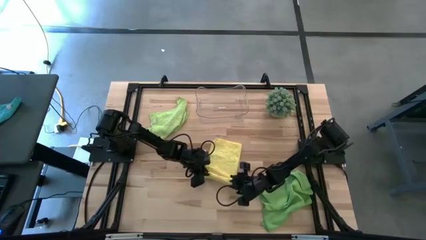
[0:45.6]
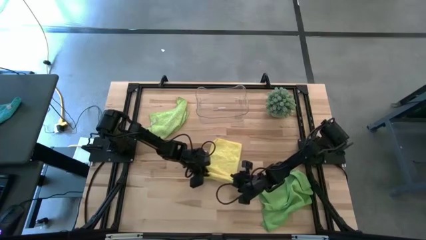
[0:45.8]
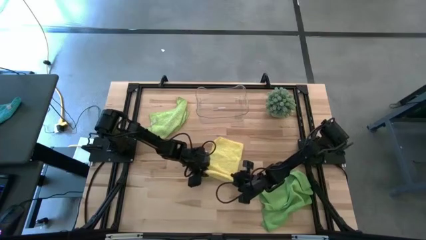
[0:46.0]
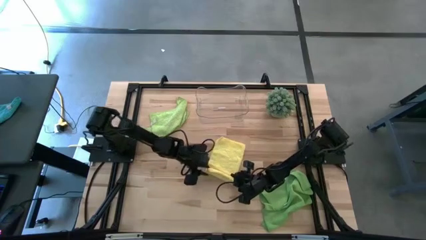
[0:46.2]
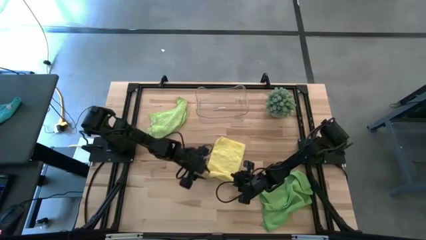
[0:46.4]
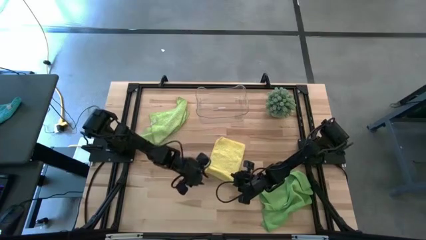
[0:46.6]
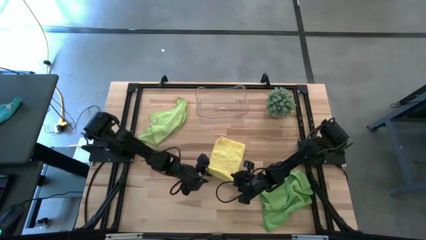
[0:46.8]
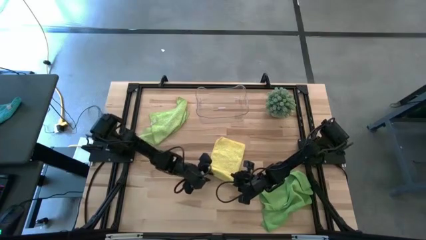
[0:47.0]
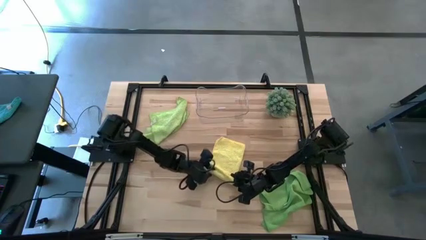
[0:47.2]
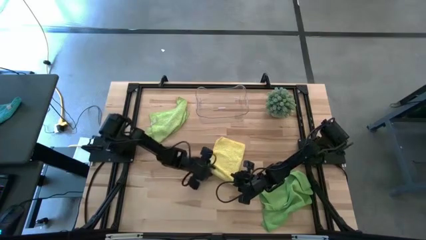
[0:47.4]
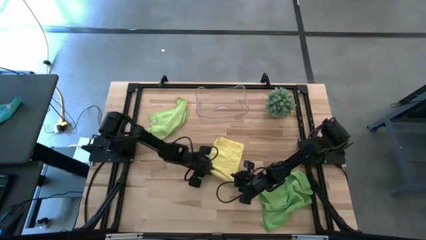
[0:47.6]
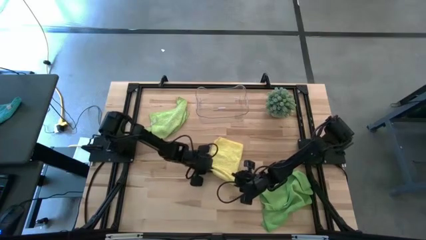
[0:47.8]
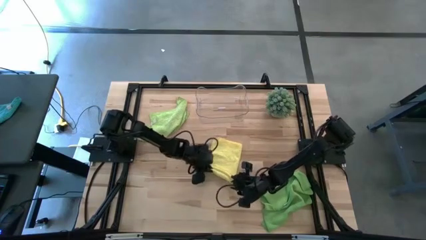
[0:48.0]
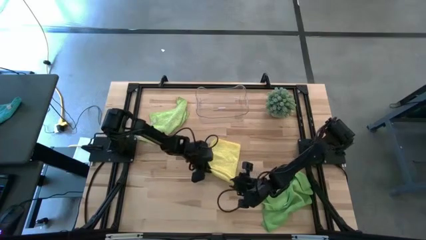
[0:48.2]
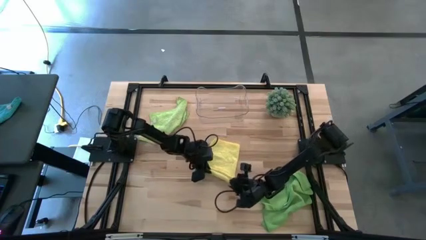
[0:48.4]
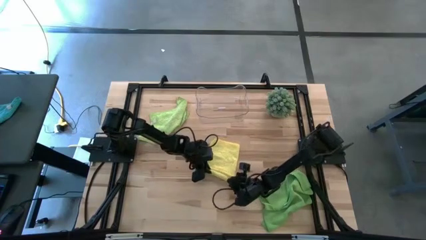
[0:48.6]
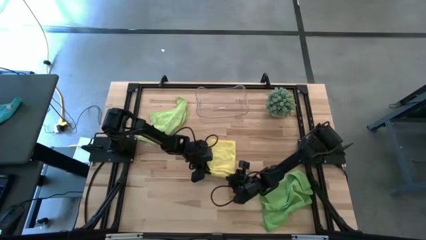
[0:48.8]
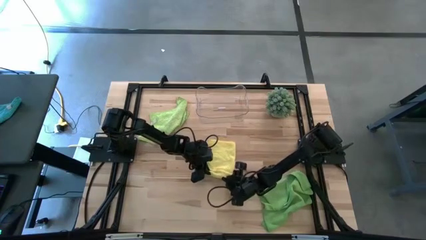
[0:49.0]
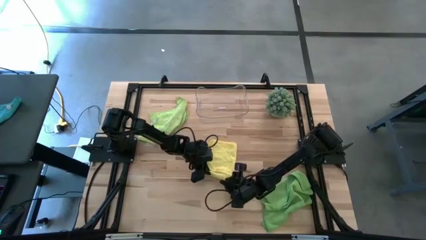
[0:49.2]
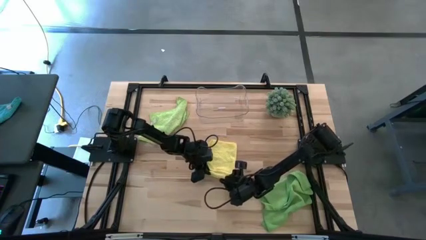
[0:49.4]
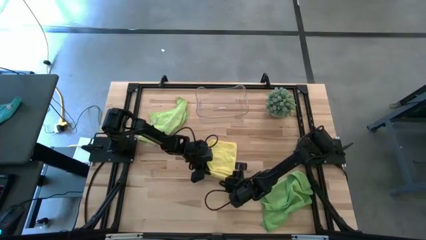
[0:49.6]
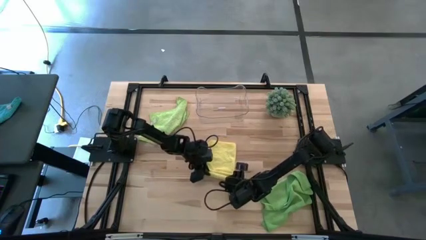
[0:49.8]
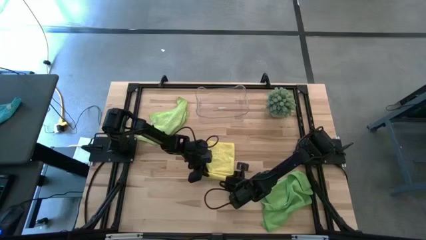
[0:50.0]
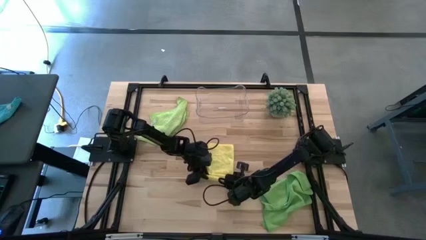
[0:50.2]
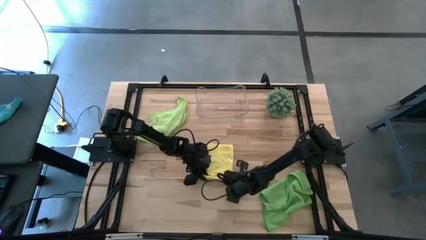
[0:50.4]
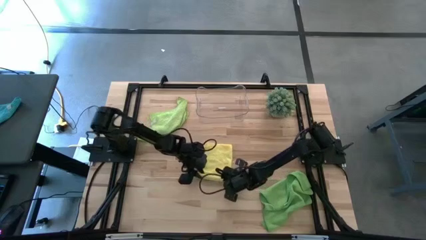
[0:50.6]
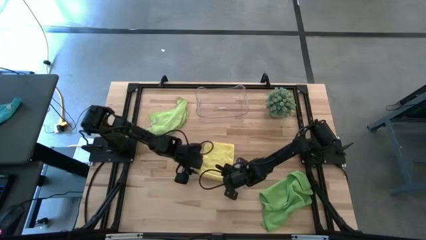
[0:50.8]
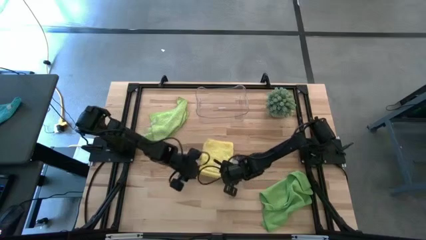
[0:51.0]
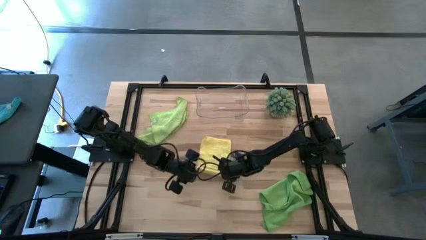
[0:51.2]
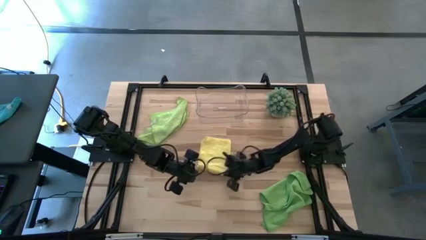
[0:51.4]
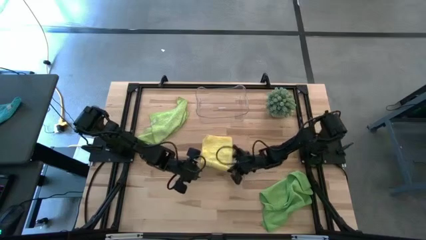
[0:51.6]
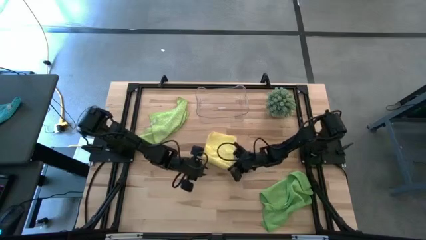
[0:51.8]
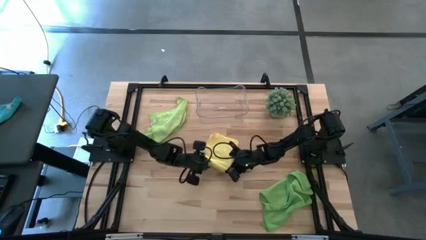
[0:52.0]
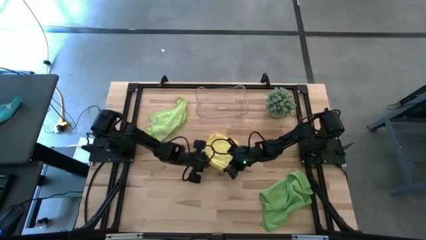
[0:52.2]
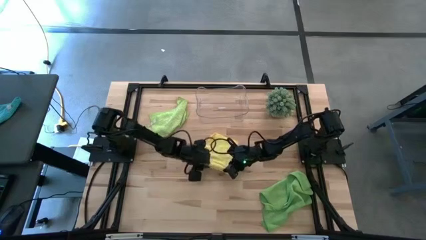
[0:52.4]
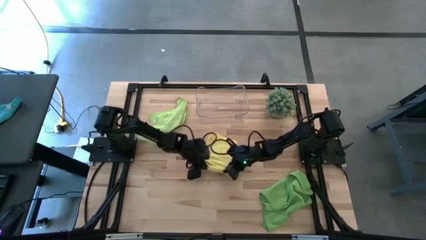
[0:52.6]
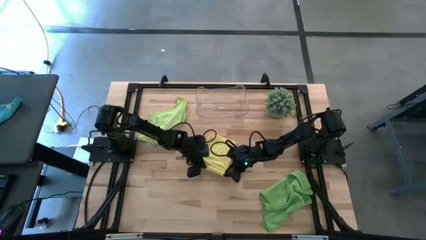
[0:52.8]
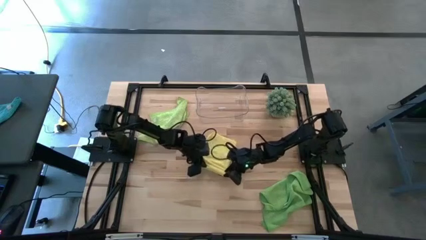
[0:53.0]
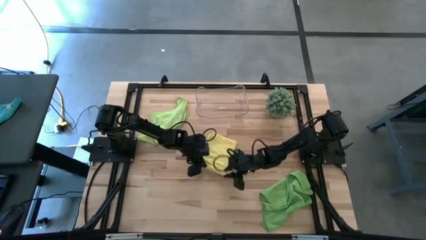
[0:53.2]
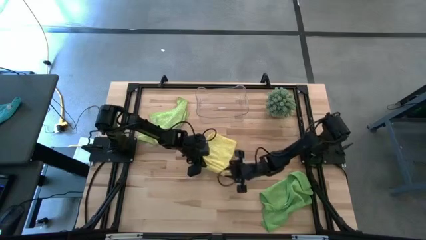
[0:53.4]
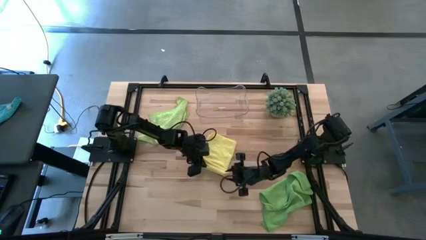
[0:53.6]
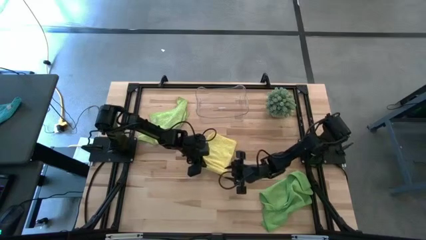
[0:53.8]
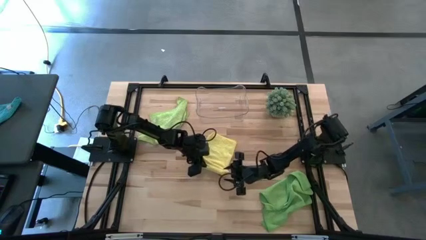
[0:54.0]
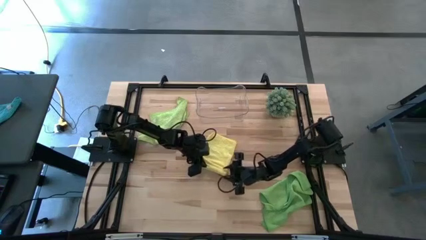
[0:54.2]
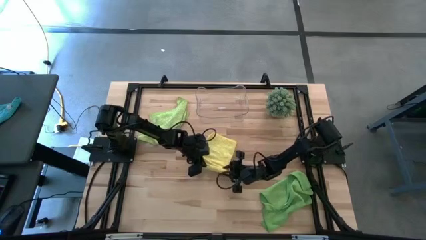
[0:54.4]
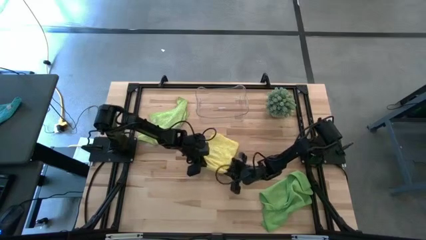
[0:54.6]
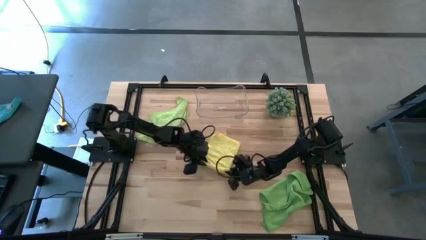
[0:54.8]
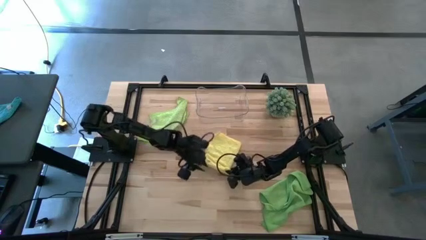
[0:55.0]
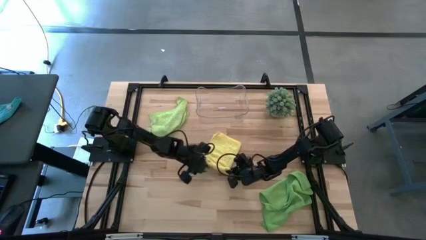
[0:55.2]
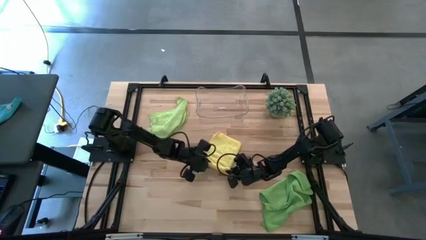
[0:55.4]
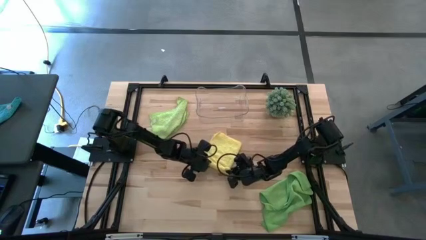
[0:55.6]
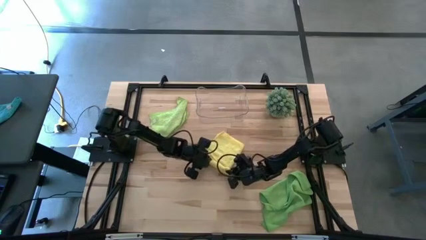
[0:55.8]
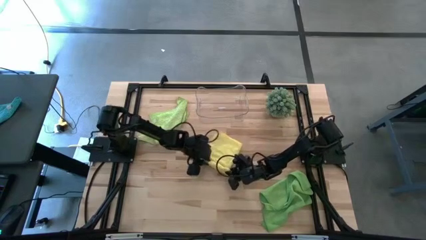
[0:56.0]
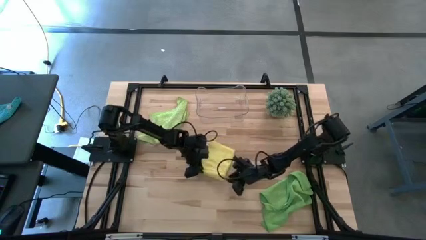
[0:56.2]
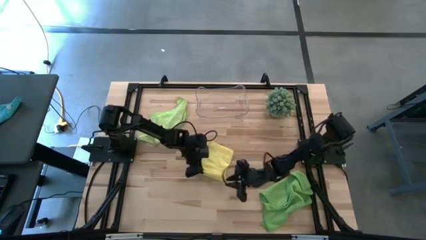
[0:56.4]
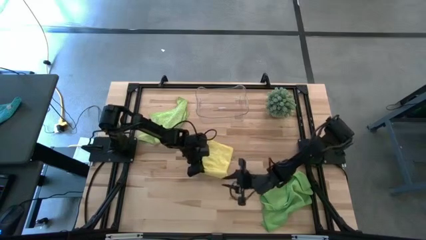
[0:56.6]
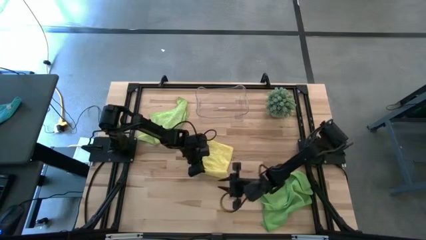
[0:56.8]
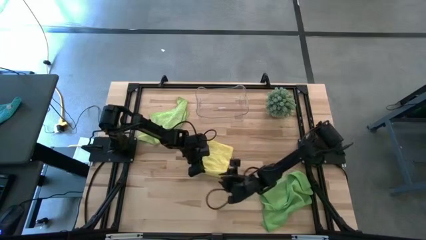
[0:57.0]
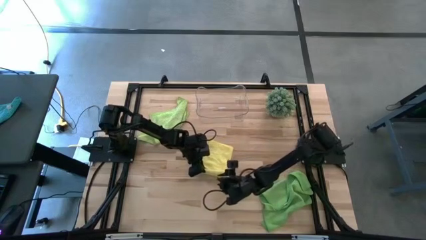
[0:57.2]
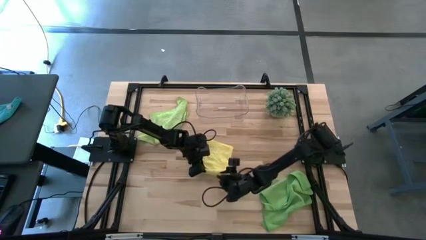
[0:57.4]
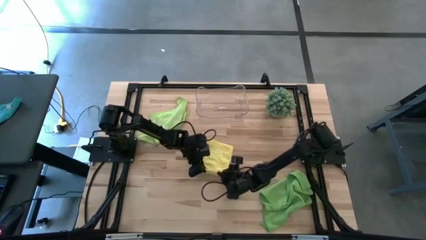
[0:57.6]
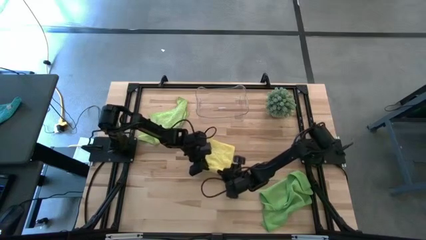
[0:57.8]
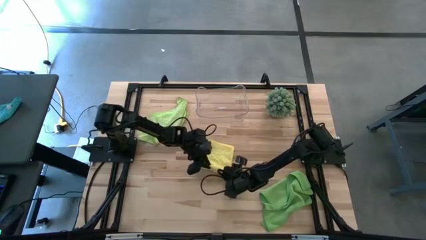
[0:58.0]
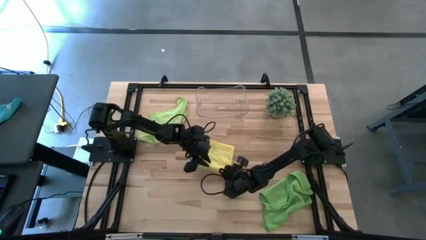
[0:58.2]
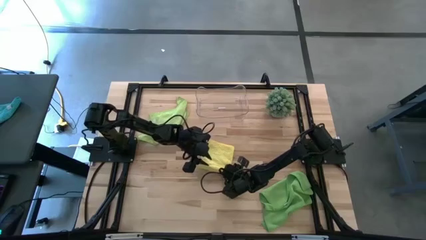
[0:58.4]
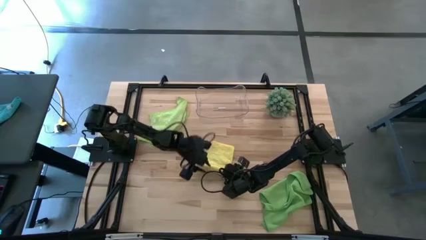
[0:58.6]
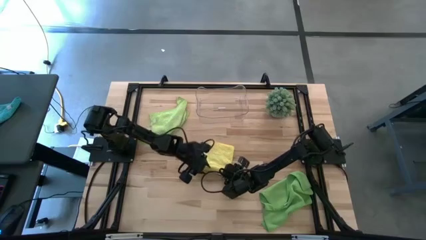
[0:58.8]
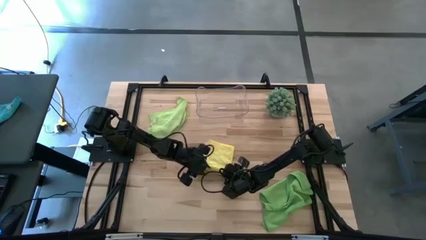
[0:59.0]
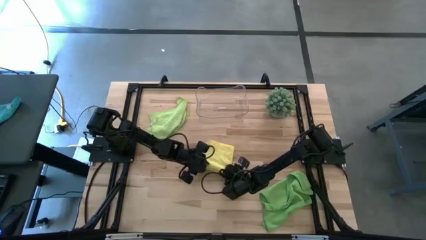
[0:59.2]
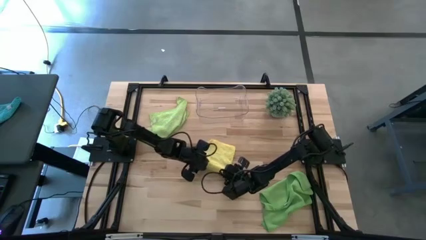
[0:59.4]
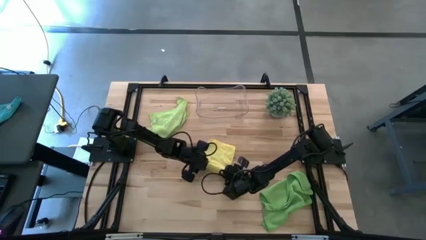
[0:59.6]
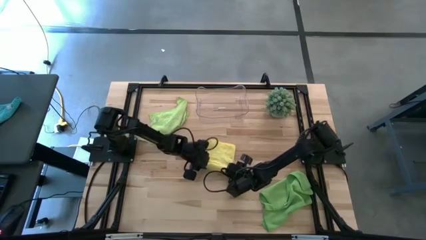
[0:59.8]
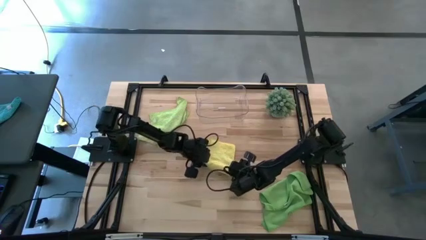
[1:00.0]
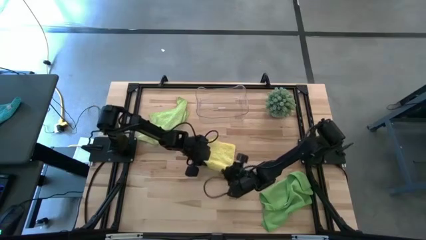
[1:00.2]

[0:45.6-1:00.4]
Task: Roll microfiber towels into tight, uniform cylinder then place into a basket
Roll the yellow microfiber towel
